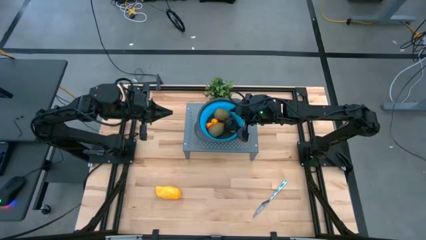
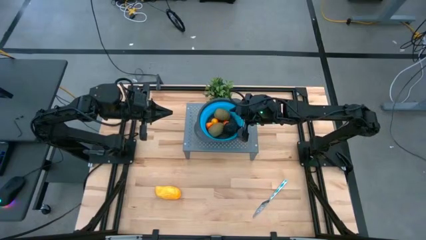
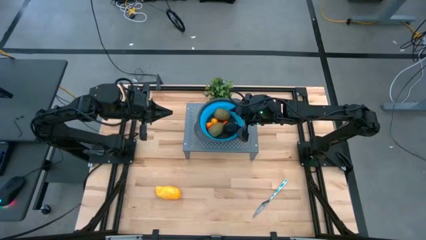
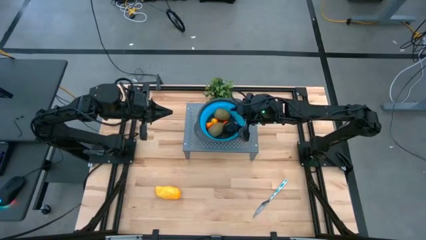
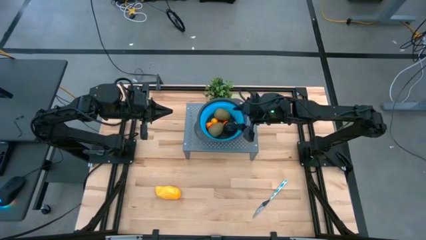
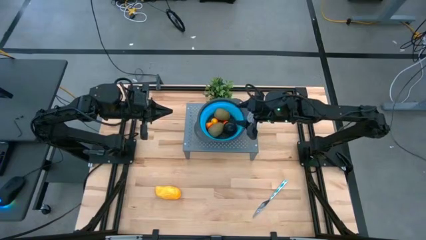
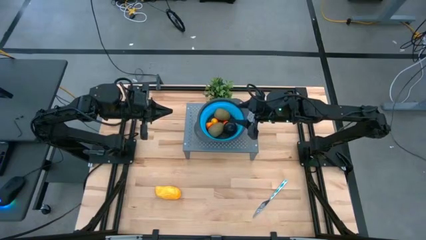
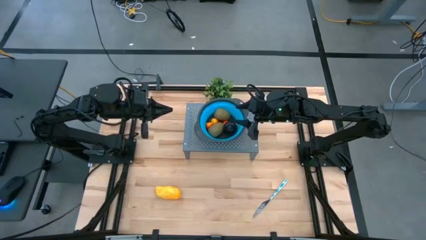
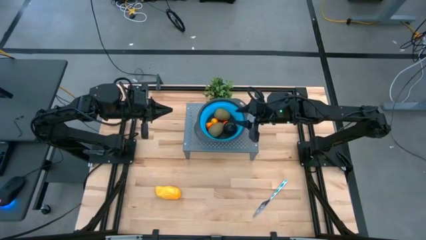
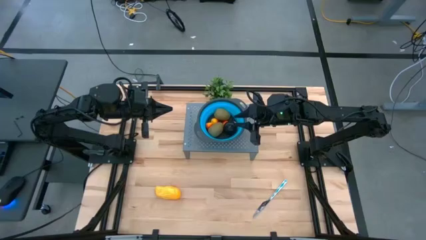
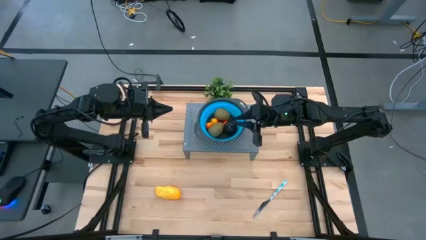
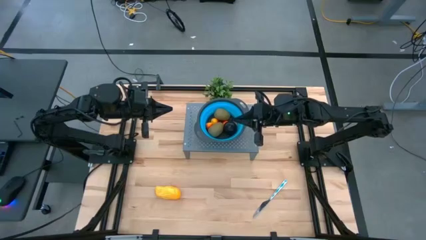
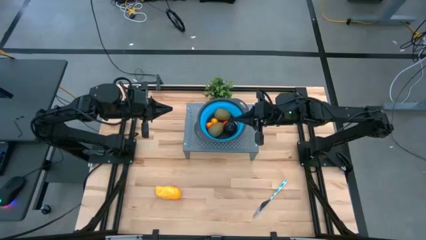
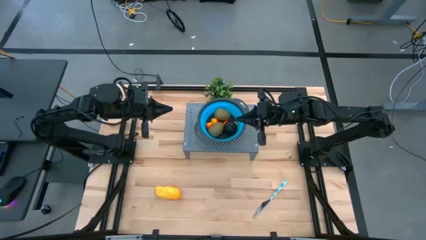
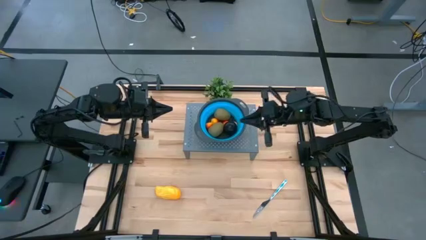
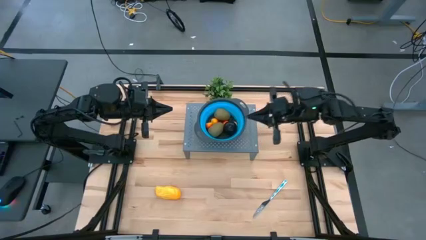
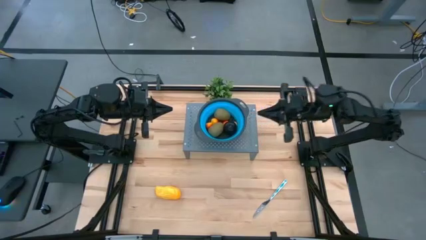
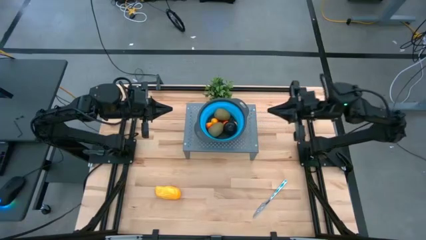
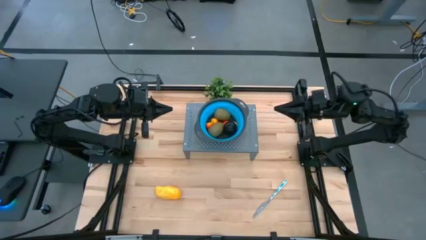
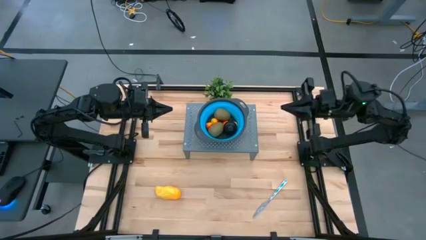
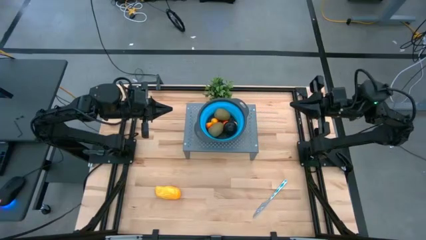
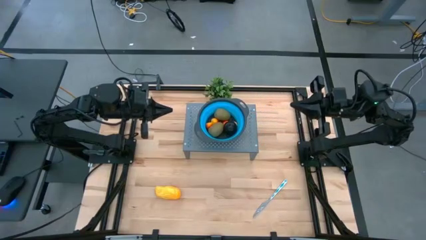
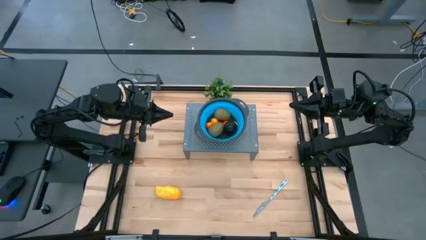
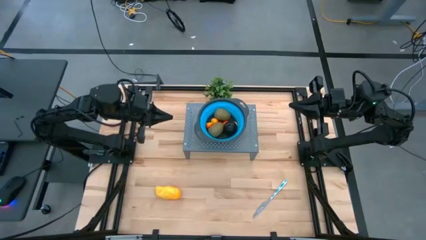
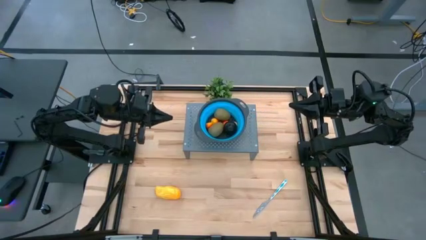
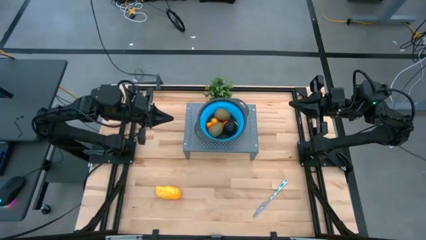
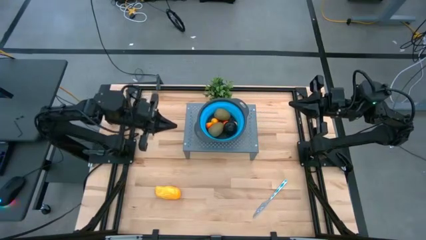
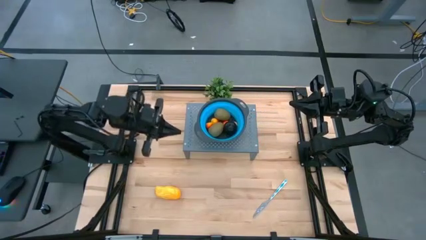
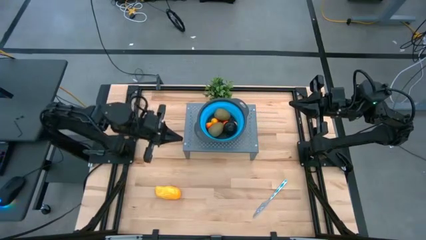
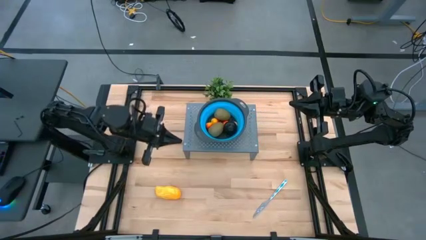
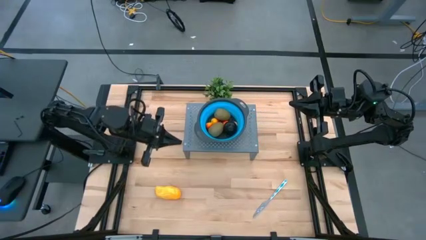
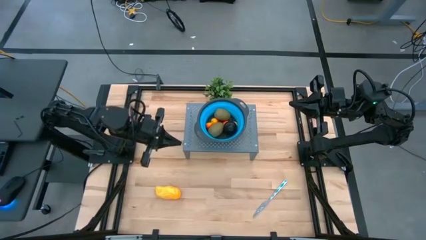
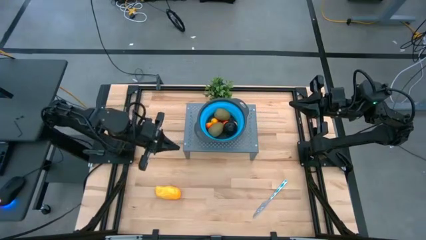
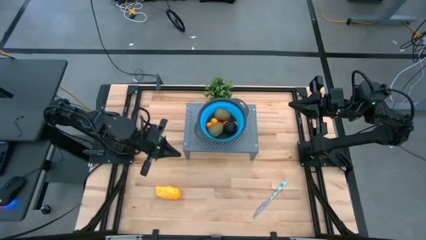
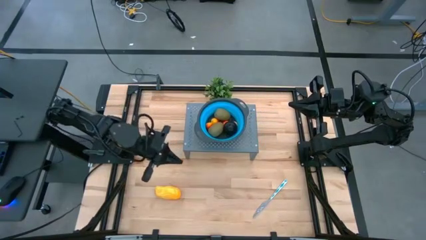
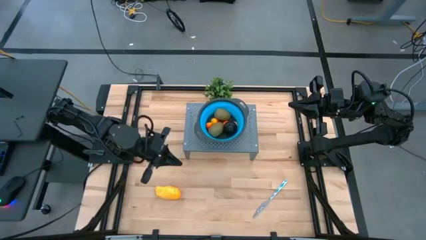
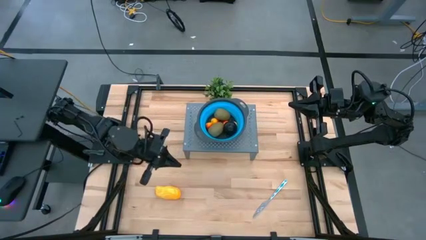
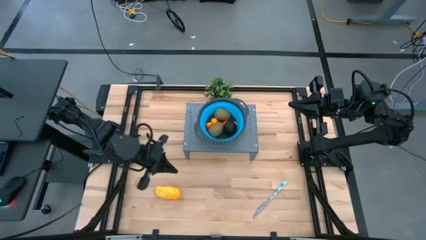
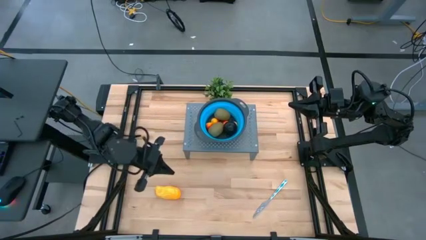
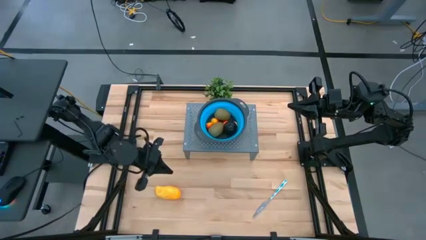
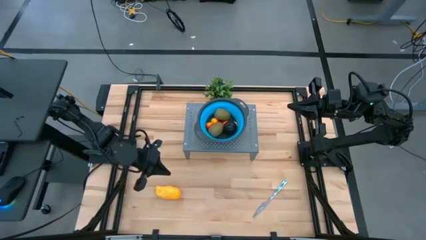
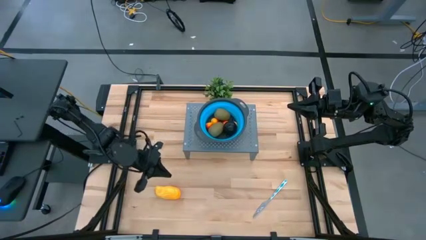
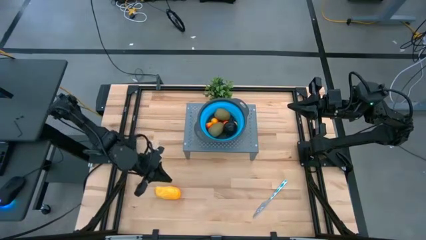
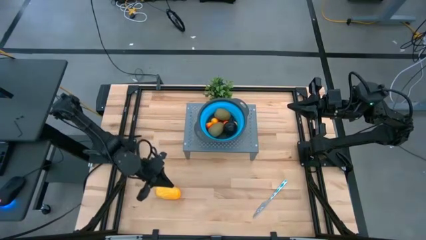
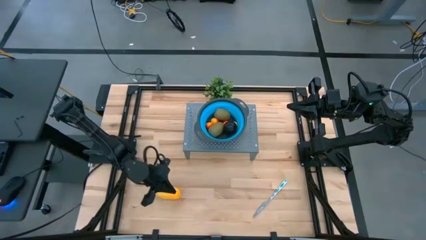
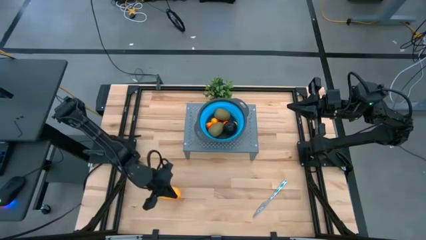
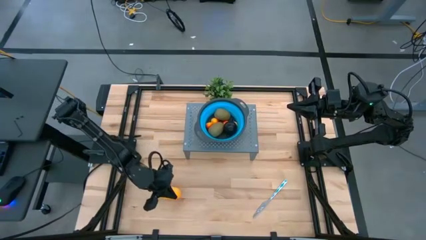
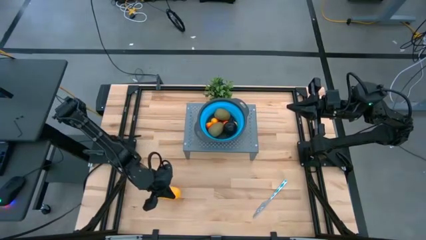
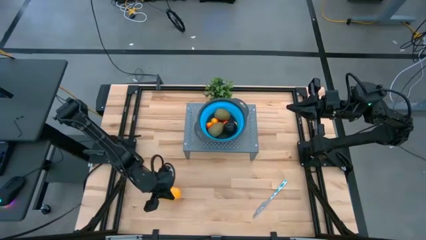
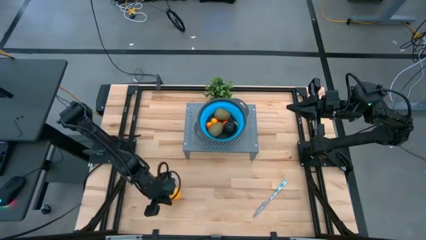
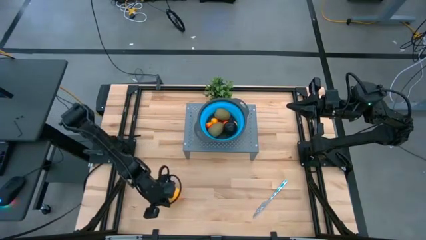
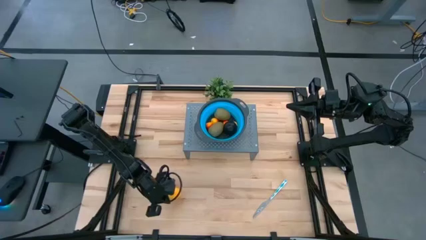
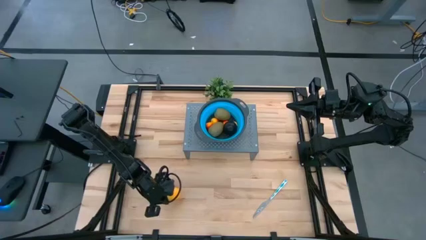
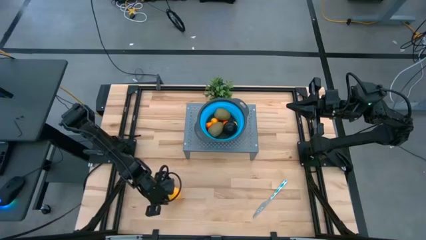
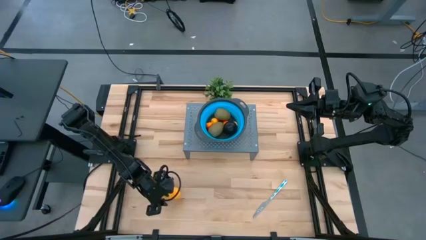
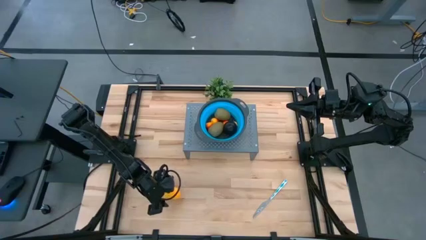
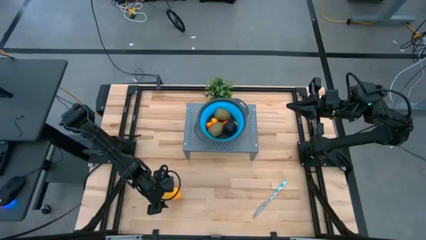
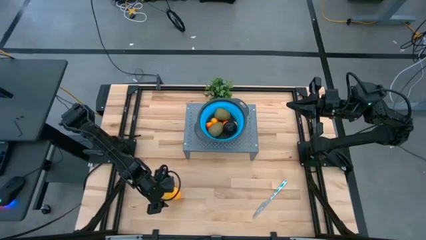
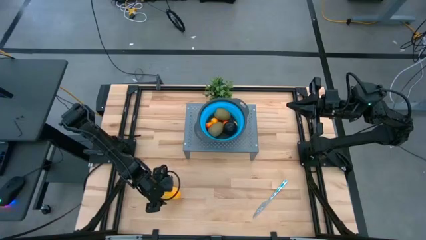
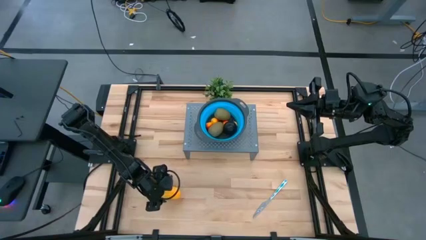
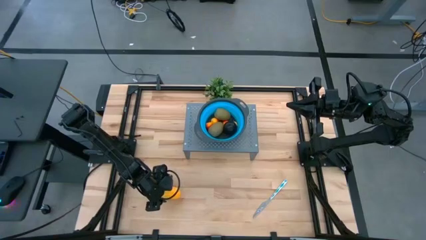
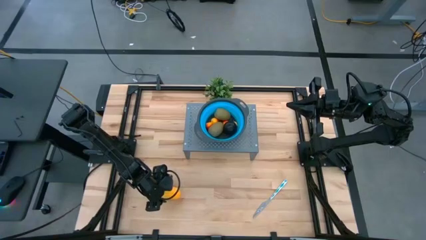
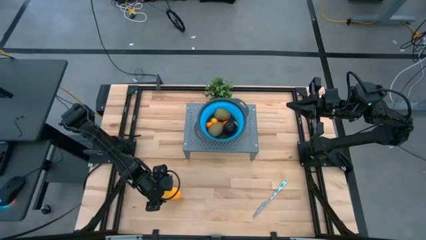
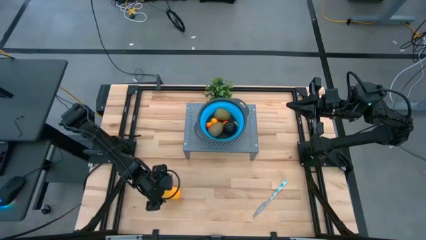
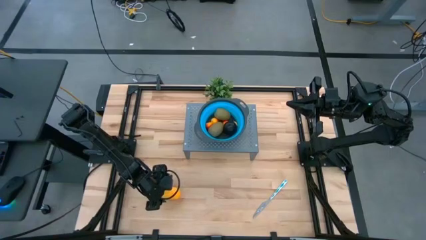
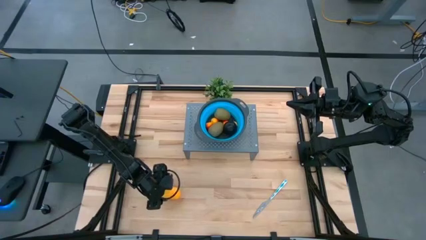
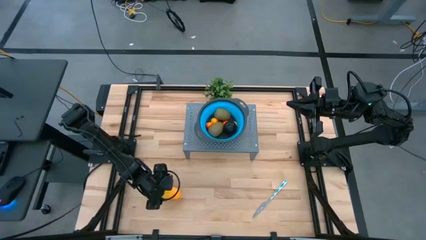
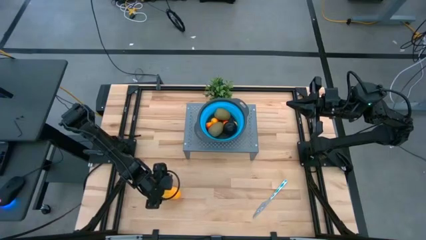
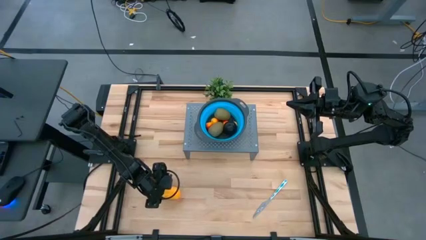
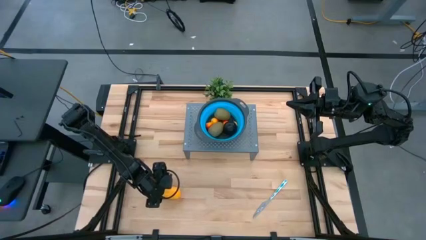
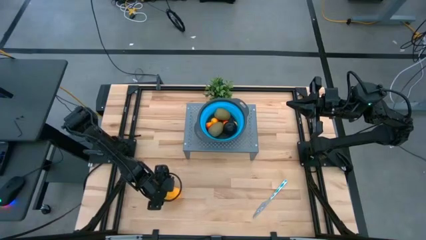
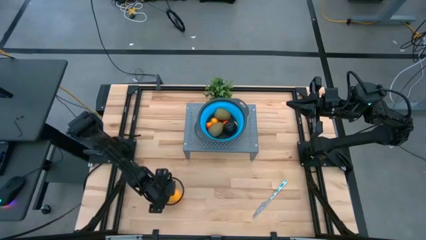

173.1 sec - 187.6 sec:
Task: Pick & Place Fruit
Put the mango into the strainer bowl on the shelf

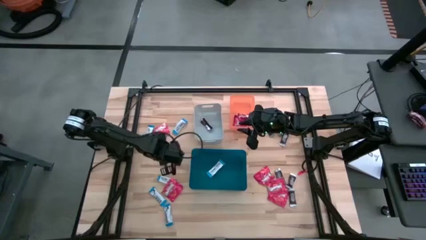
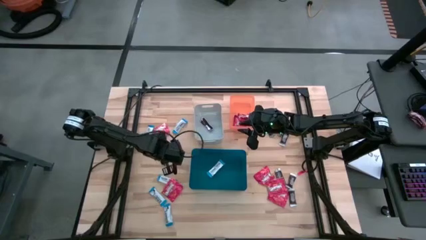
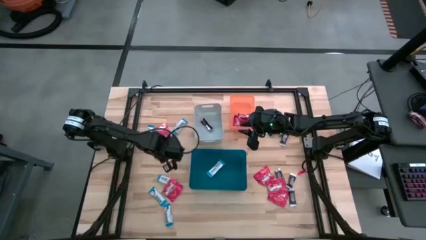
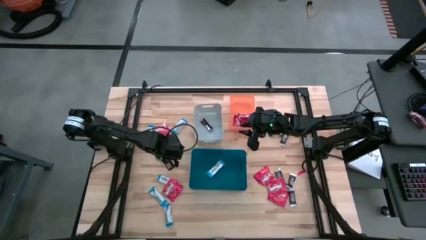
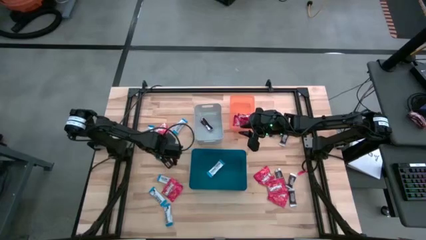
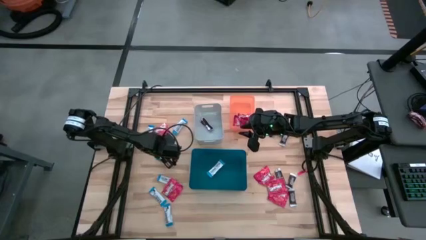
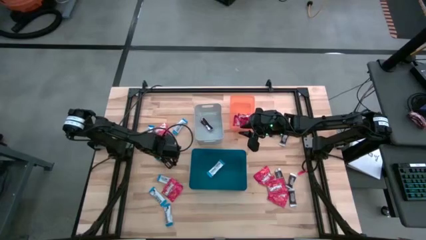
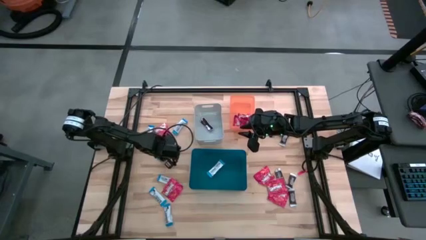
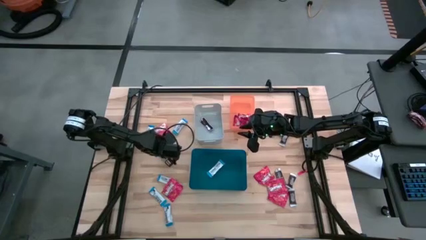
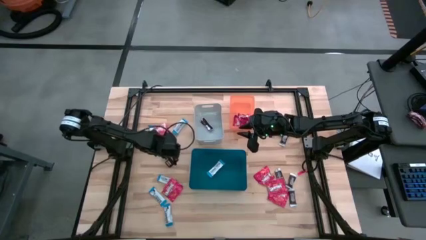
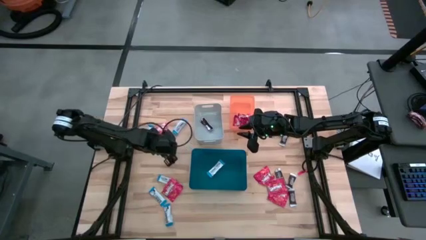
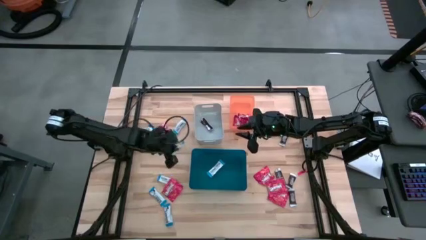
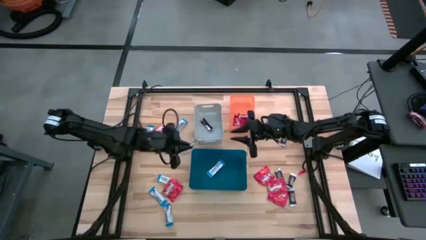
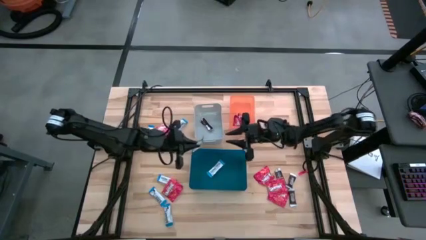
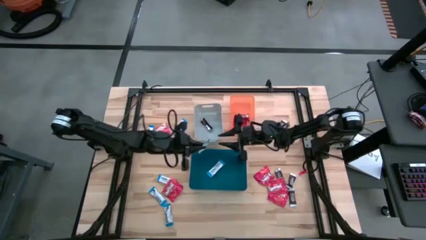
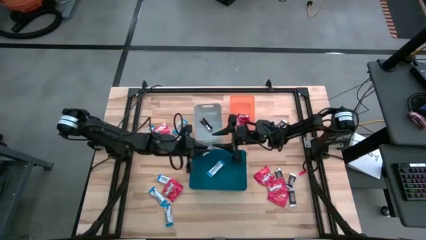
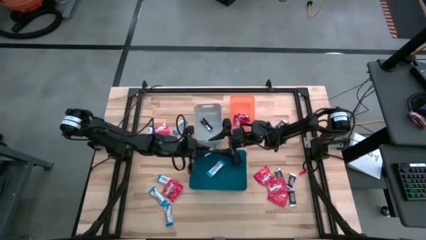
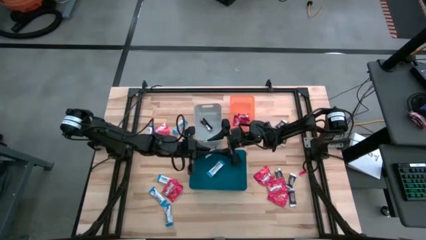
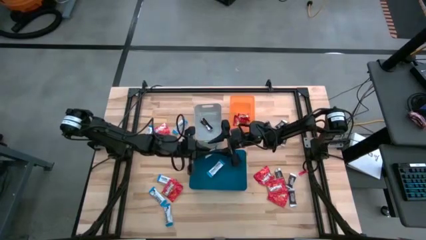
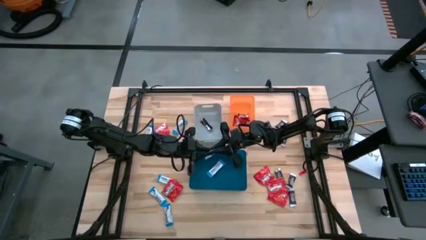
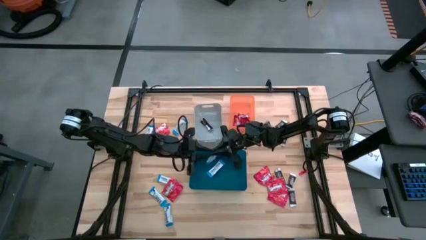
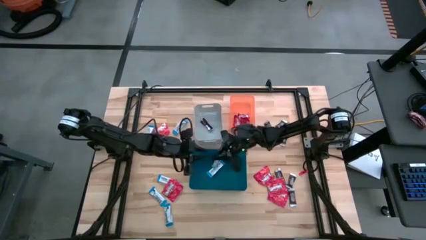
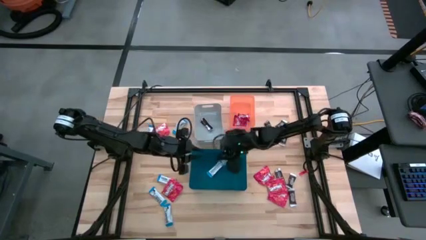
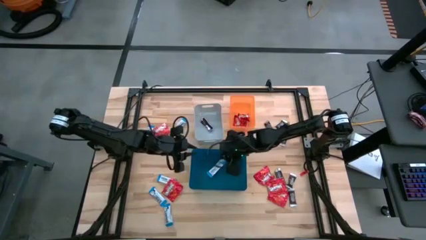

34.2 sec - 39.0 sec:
Task: Sort candy
Put the white chocolate bar into the blue bin
